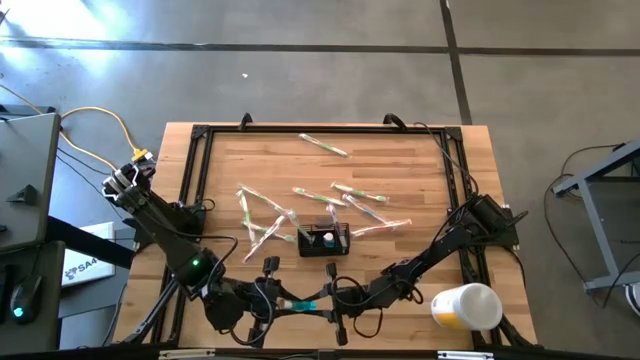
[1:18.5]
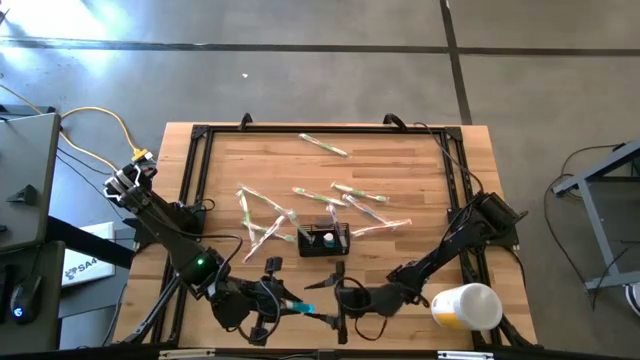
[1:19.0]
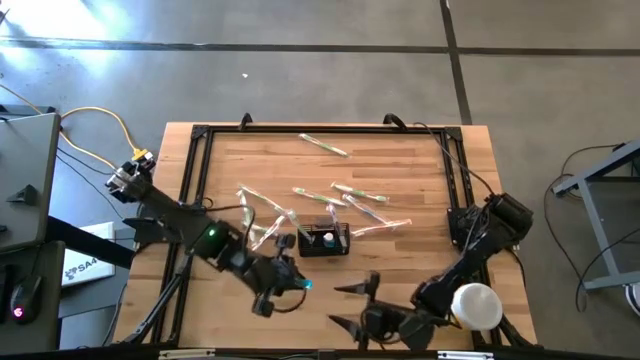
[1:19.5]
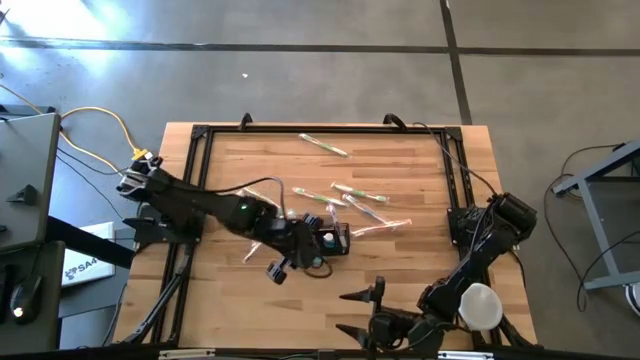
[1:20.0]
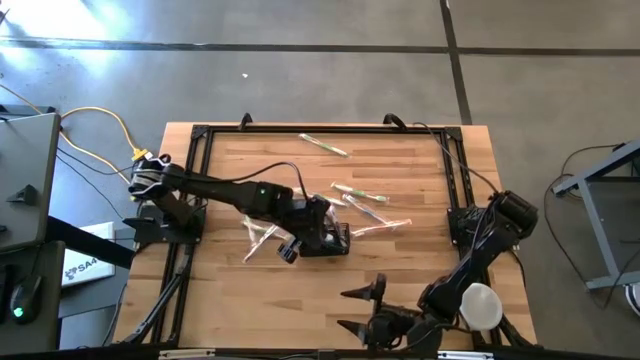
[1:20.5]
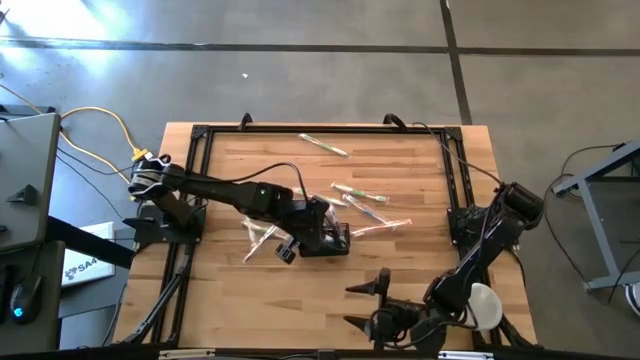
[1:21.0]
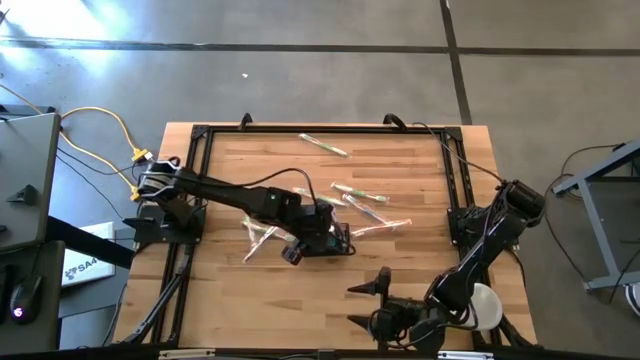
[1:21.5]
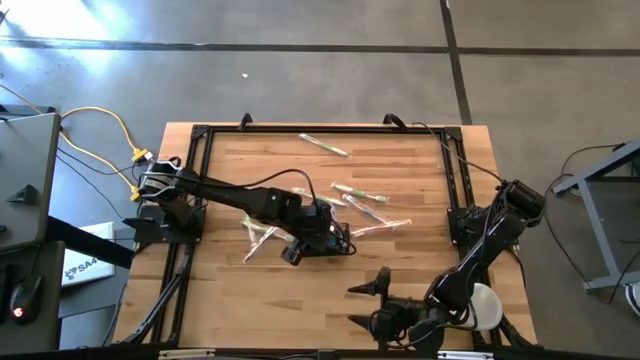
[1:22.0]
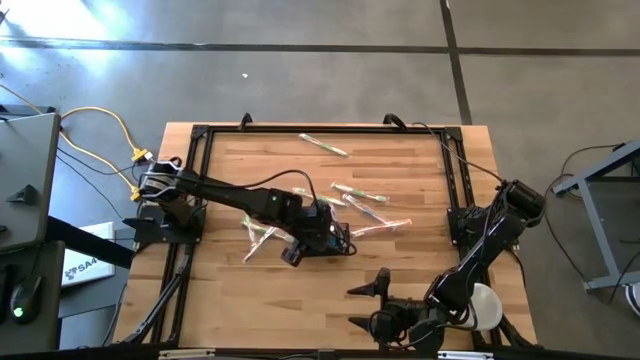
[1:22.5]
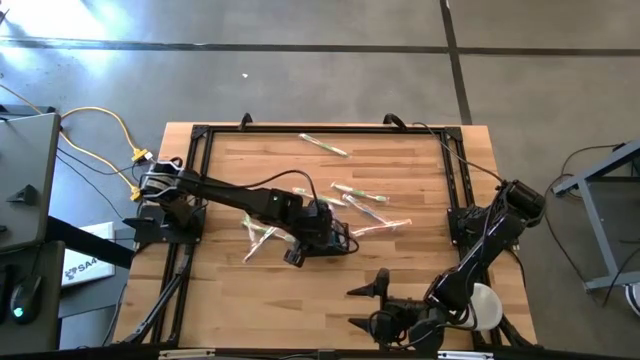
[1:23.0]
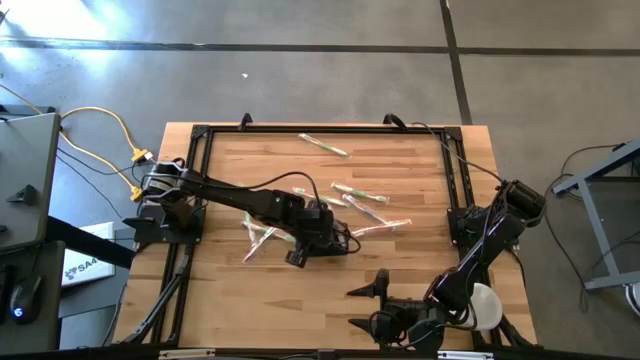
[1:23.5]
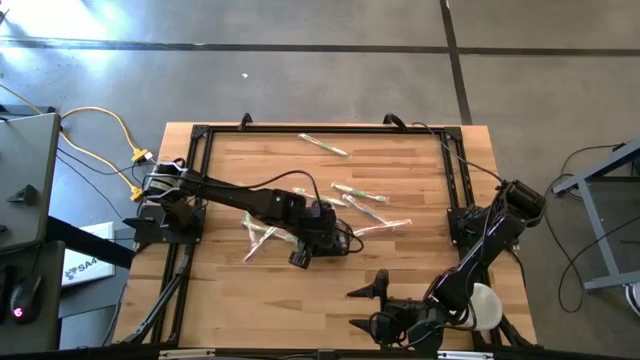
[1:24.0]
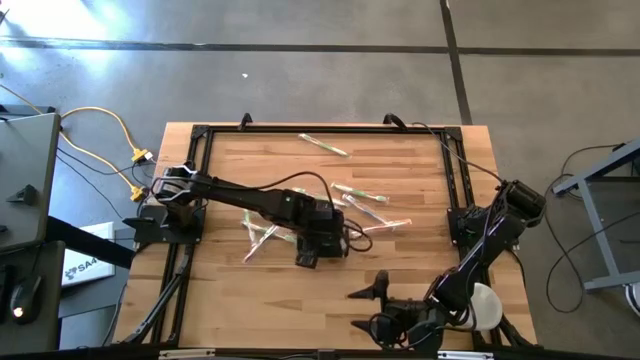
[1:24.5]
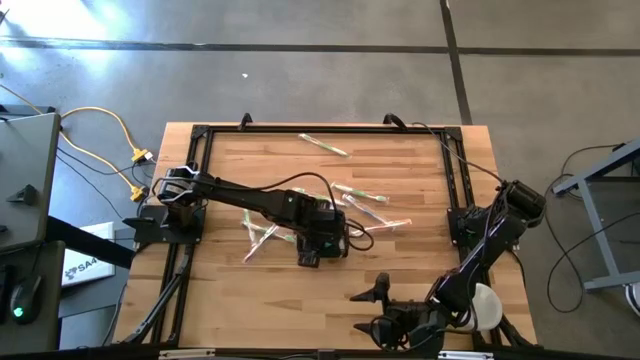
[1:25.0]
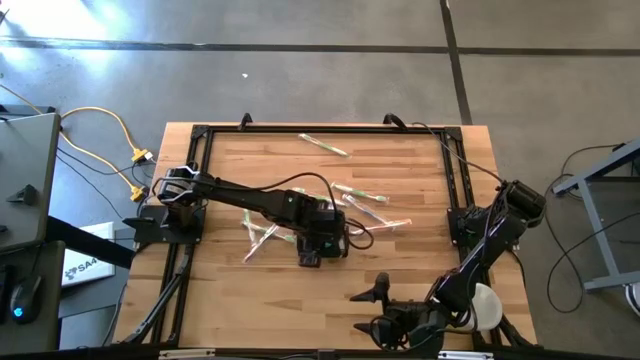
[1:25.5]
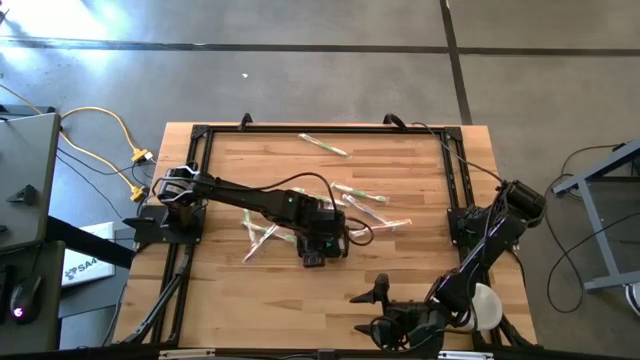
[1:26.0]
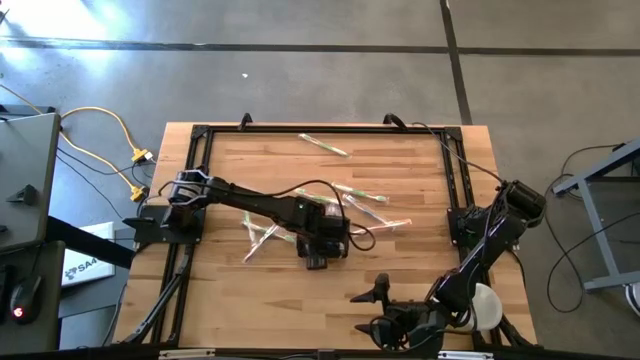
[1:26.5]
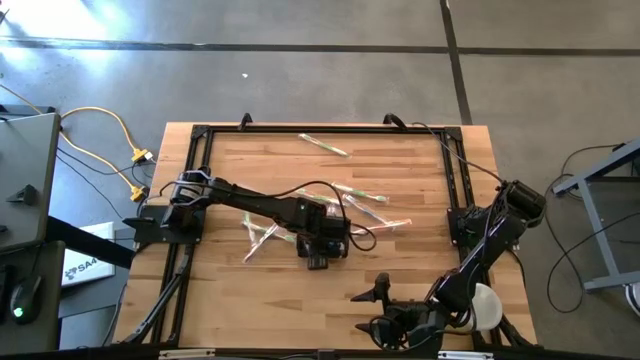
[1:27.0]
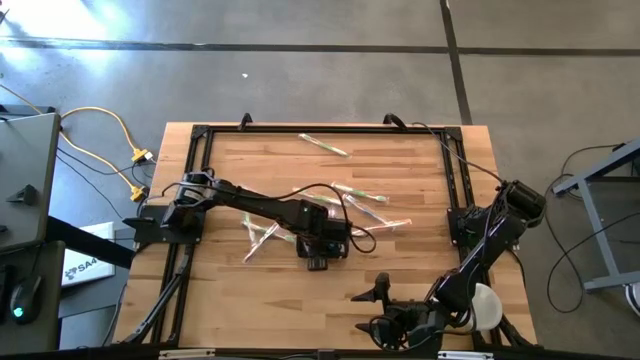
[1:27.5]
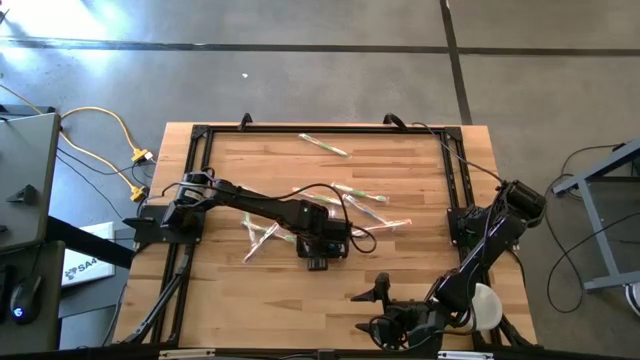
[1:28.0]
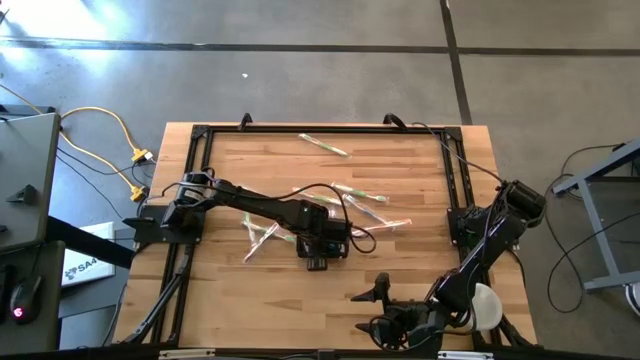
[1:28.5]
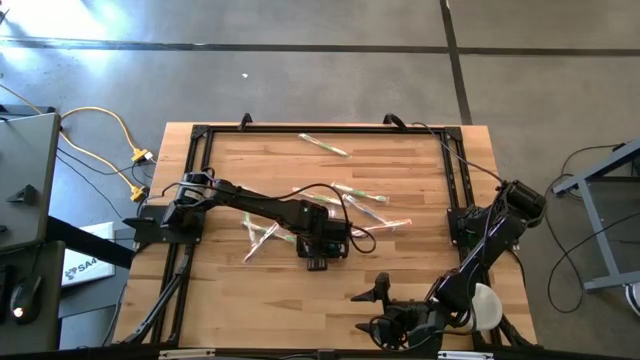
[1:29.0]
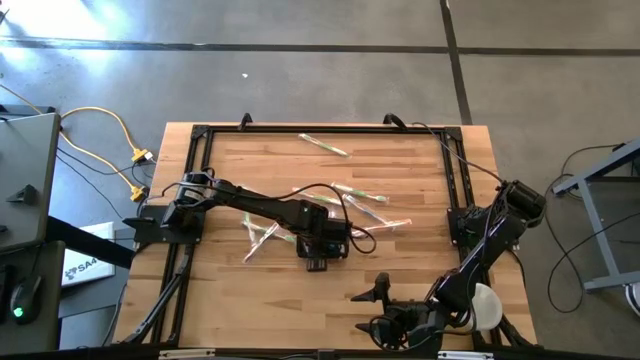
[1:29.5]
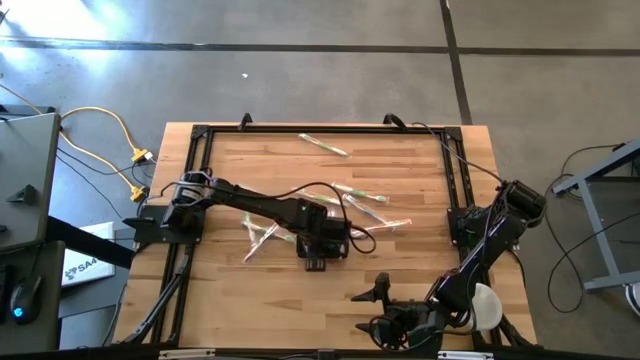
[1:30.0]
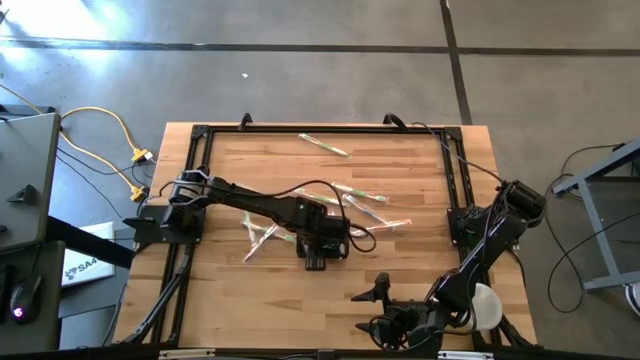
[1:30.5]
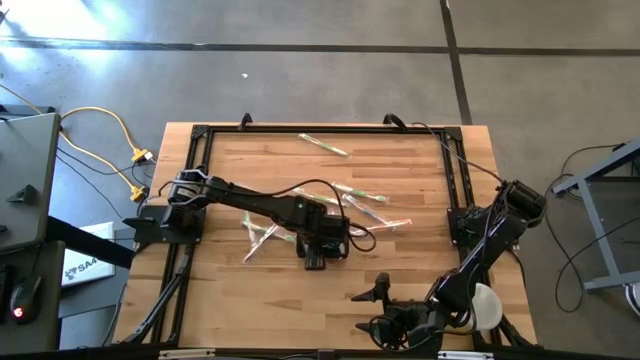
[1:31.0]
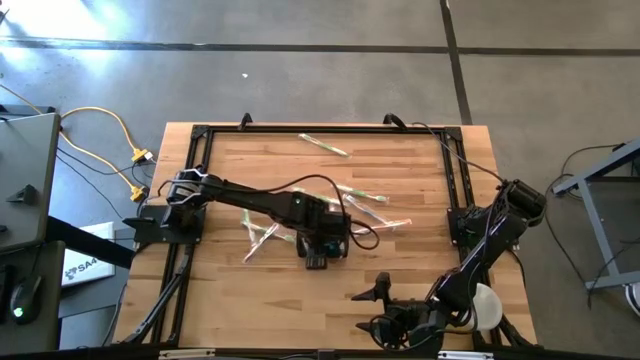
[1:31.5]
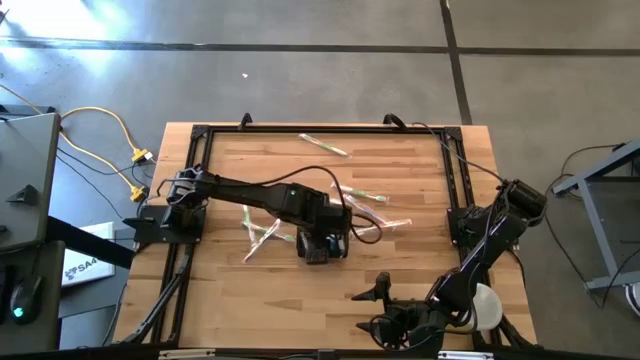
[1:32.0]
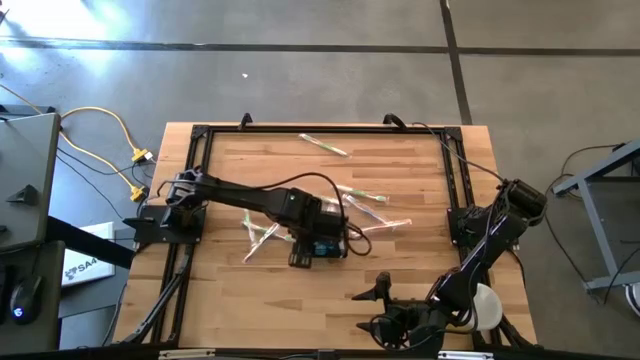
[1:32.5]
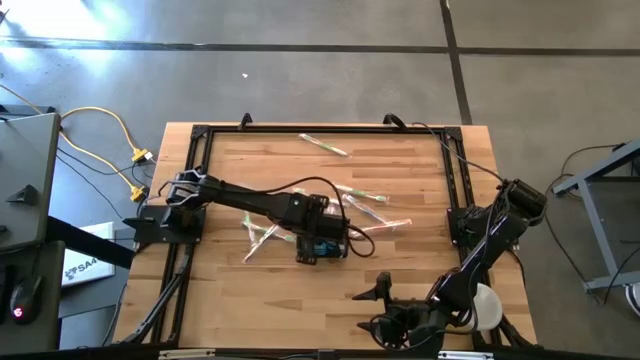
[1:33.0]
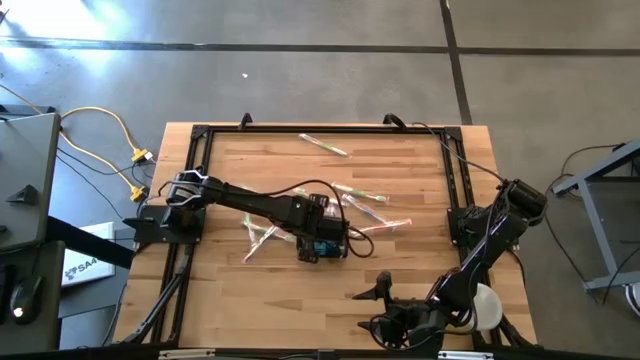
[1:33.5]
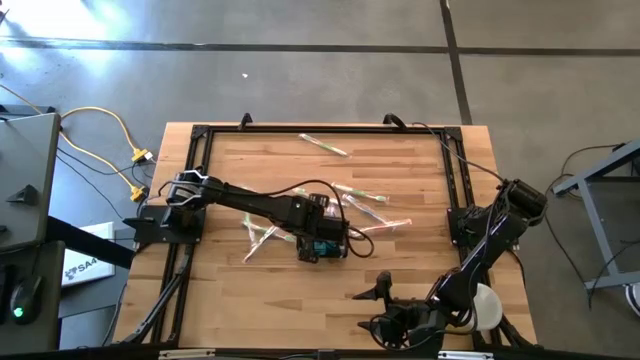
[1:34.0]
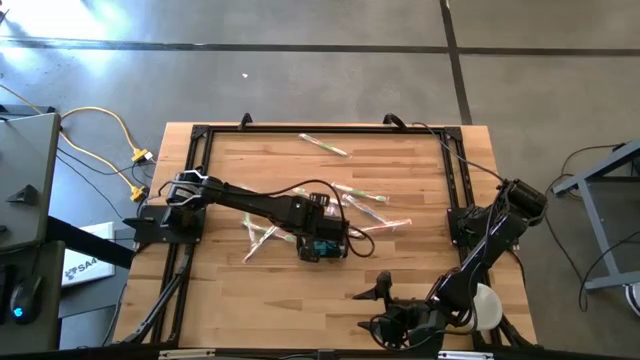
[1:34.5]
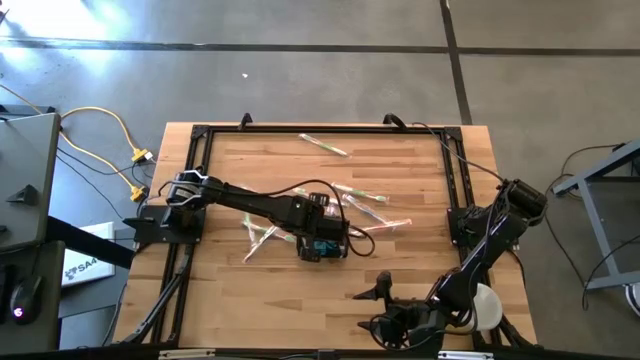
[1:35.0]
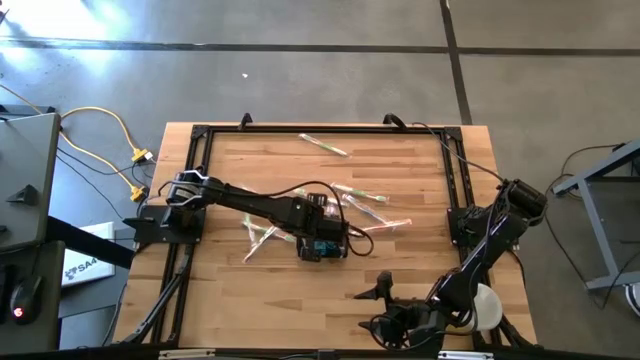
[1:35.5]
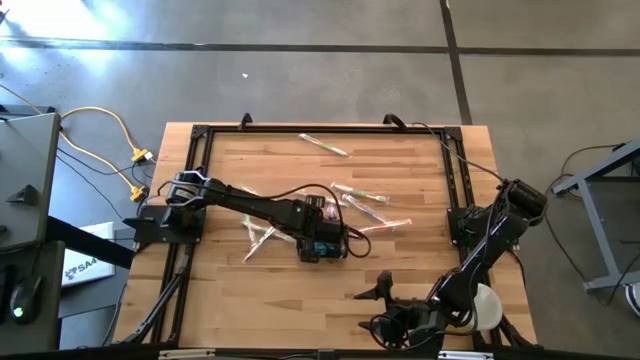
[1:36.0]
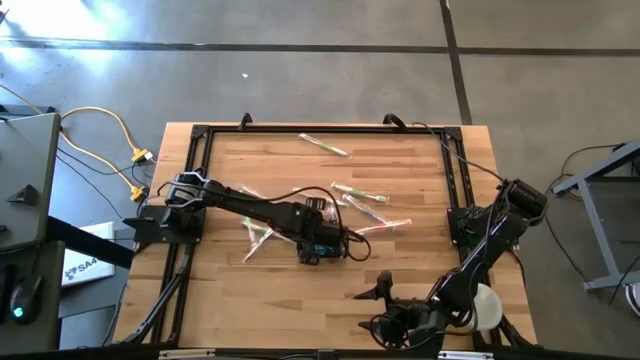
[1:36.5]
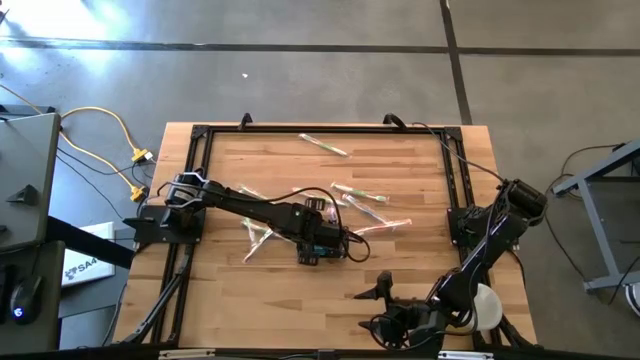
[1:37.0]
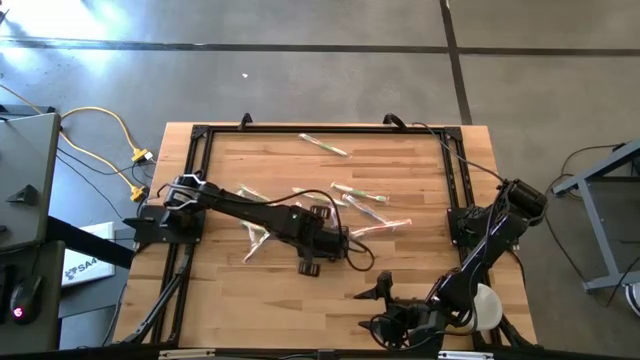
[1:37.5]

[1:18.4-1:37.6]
Task: Pick & Place toothbrushing station
Put the mouthwash into the wire organizer

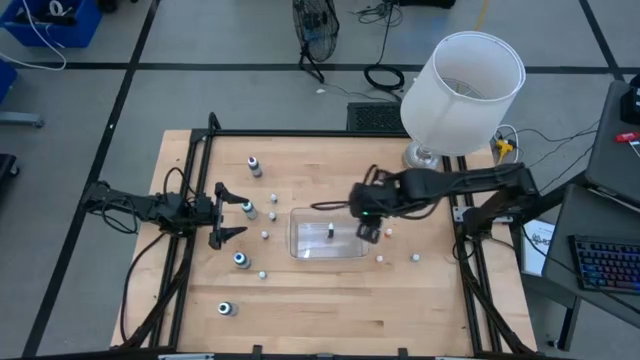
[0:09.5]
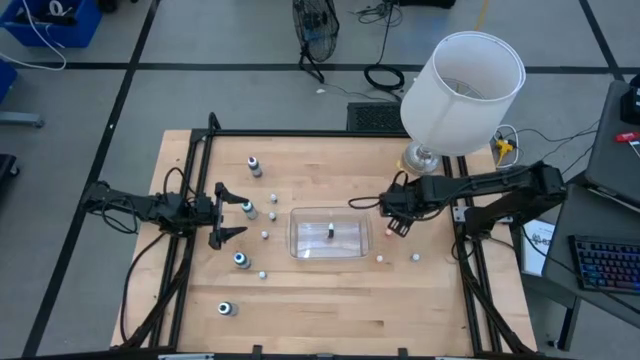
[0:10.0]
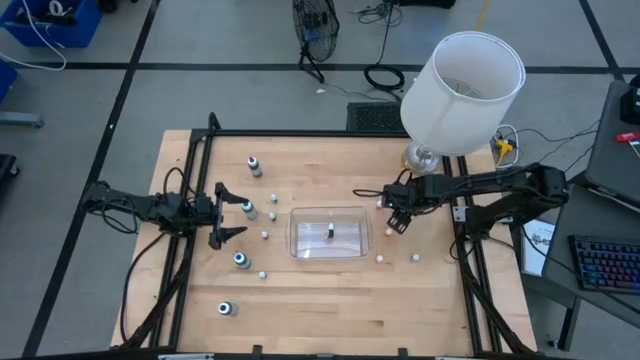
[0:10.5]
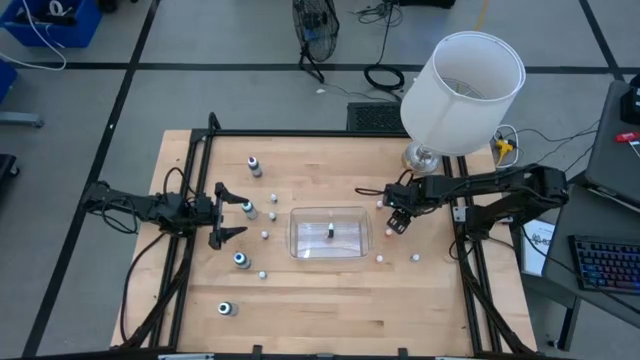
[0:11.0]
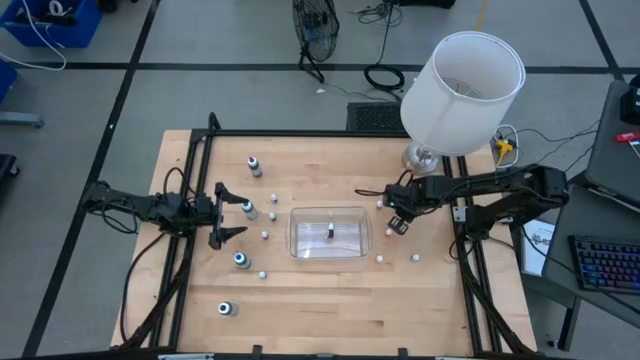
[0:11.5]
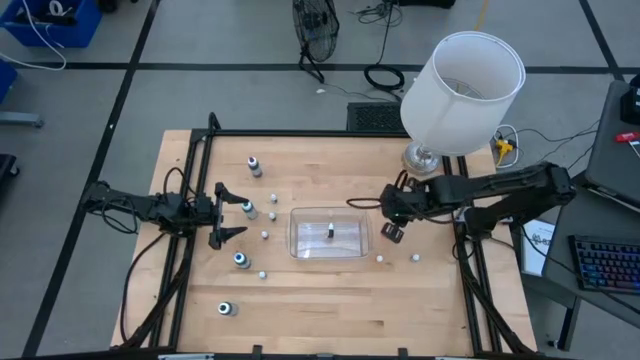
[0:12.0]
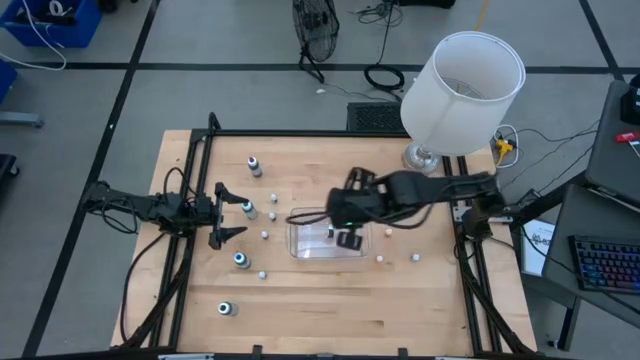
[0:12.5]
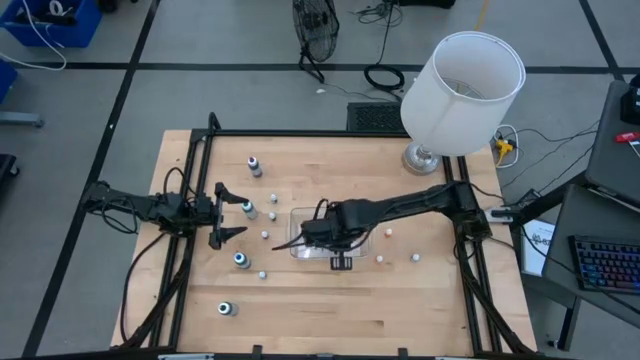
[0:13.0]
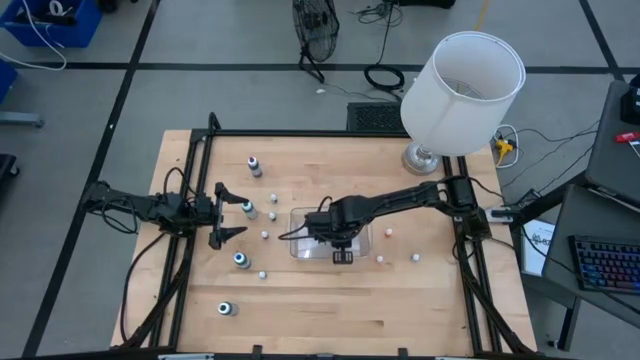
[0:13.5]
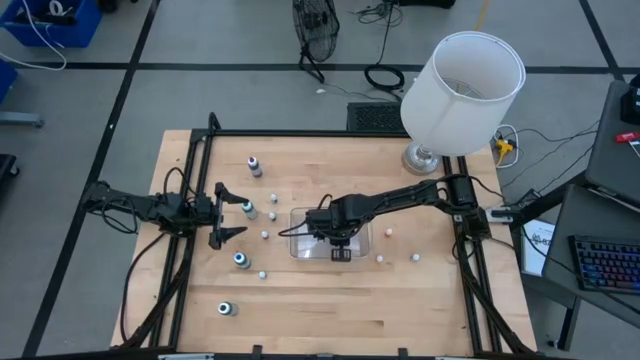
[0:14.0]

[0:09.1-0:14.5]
Task: Pick & Place food coloring
Put the small orange food coloring bottle into the transparent bin
